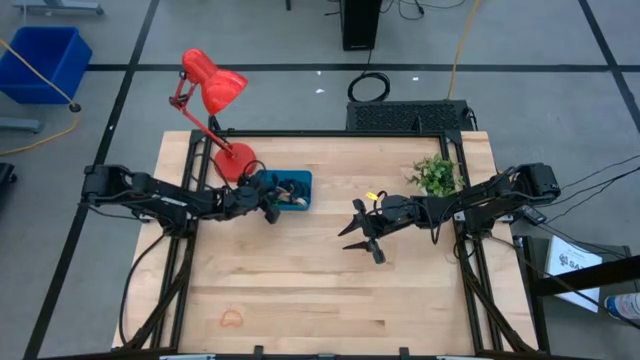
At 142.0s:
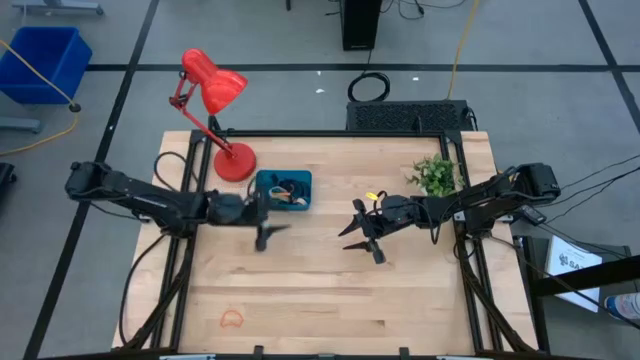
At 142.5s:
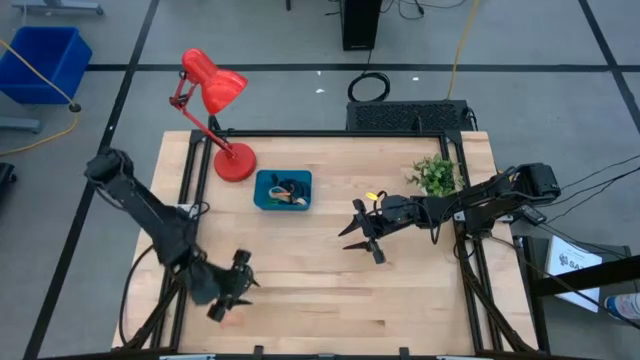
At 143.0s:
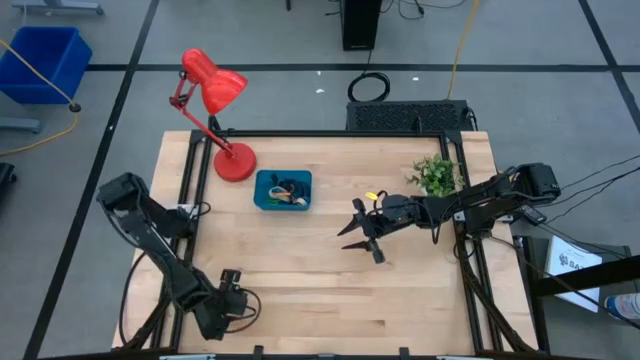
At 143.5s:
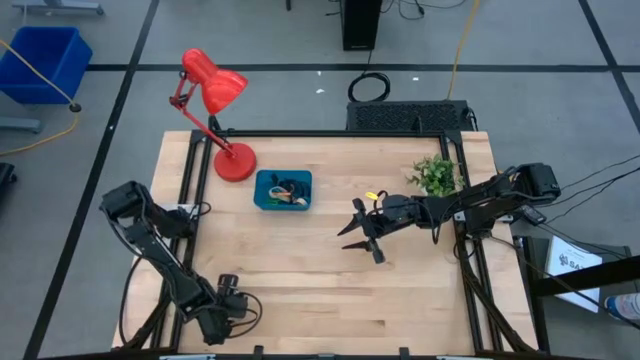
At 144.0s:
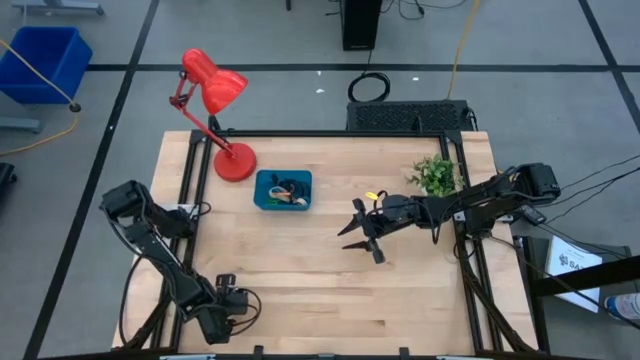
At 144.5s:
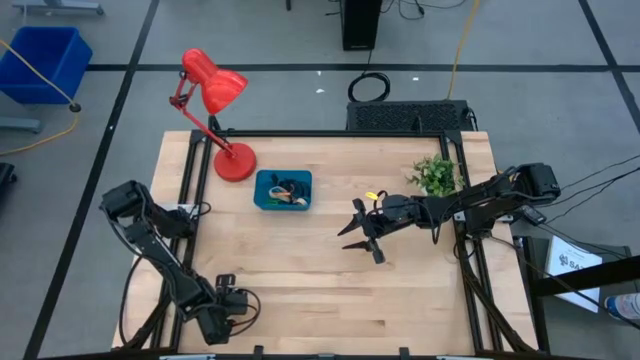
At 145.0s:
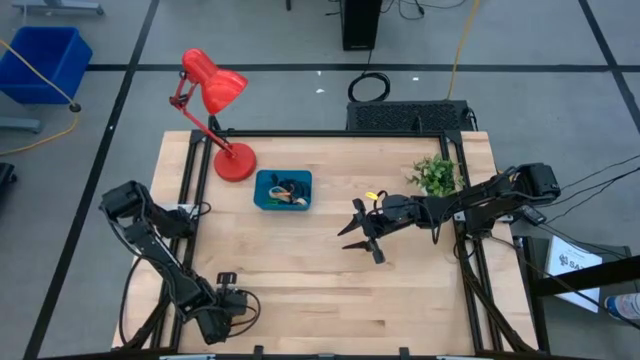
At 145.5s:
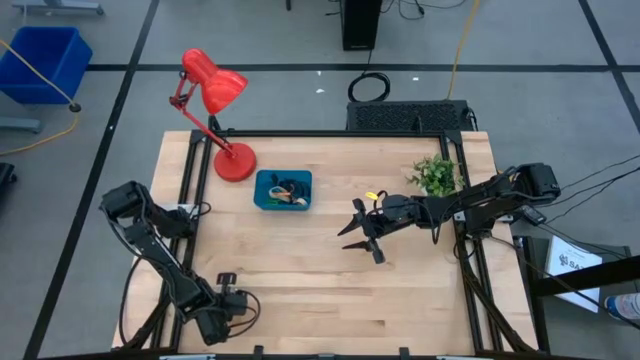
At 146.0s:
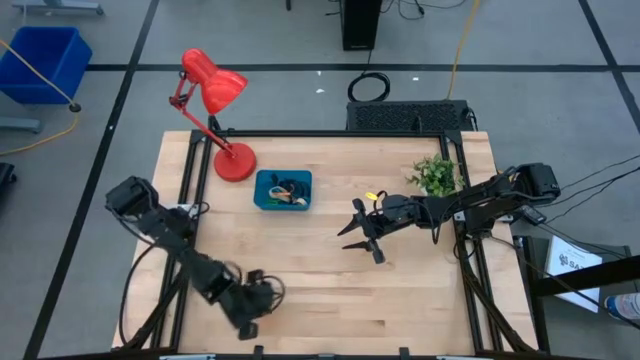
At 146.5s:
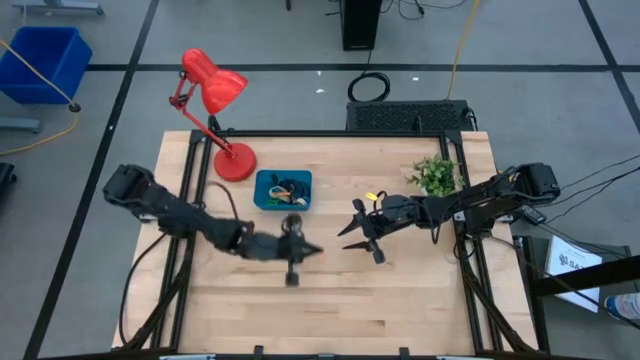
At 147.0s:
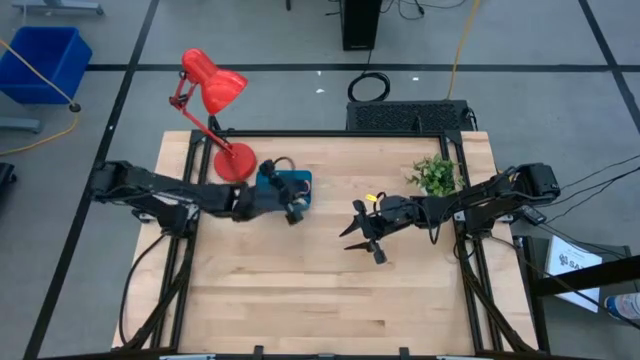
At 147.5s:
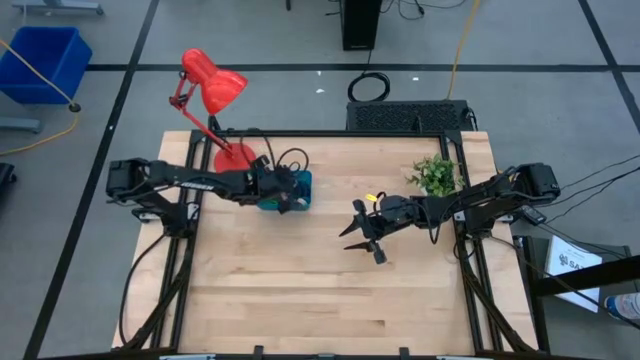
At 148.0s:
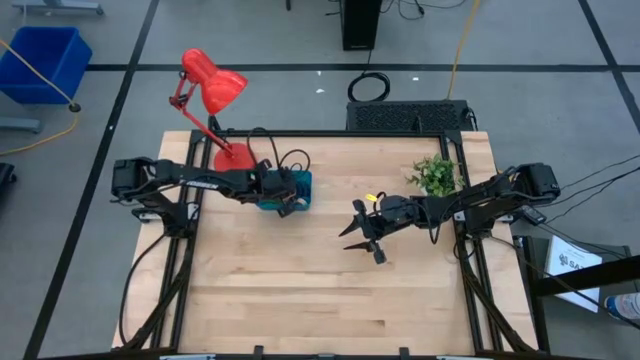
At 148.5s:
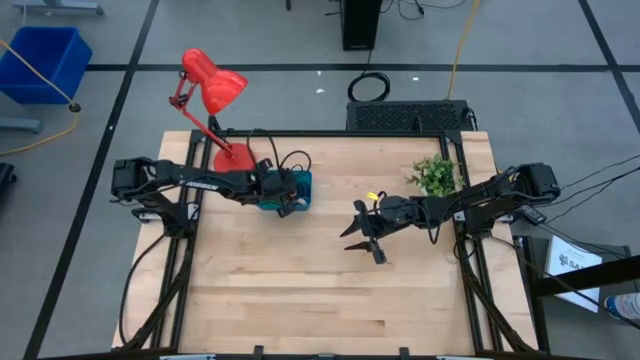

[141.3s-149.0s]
Task: Pick and place rubber bands into bin
Put the orange rubber band into the blue bin

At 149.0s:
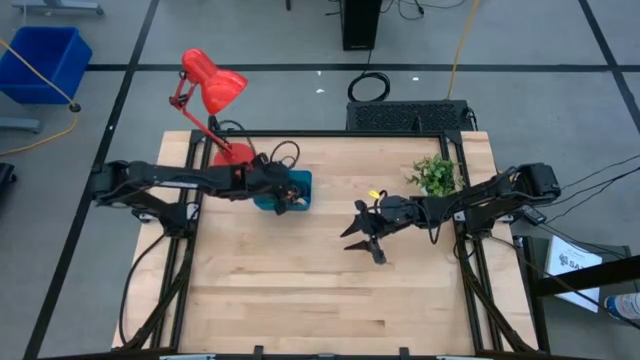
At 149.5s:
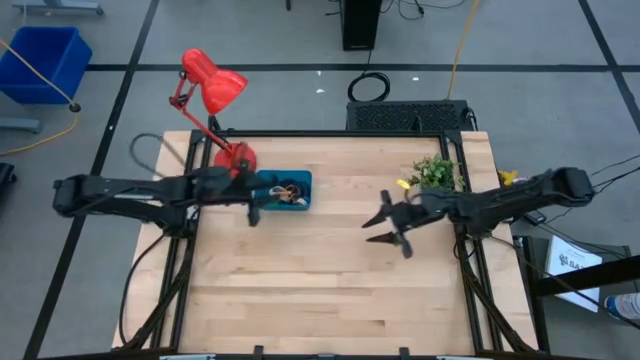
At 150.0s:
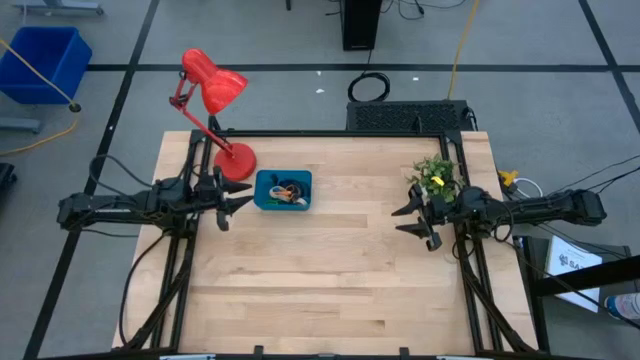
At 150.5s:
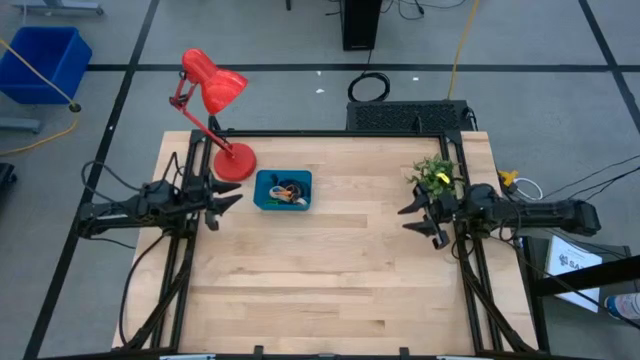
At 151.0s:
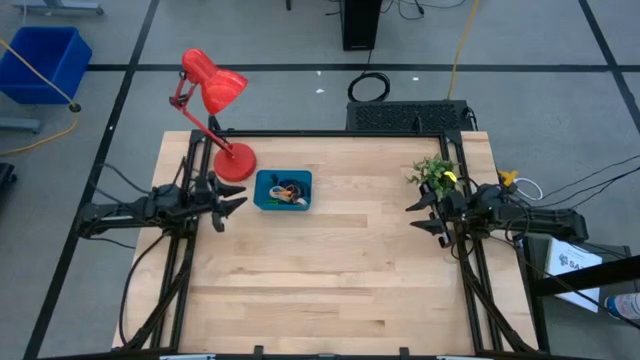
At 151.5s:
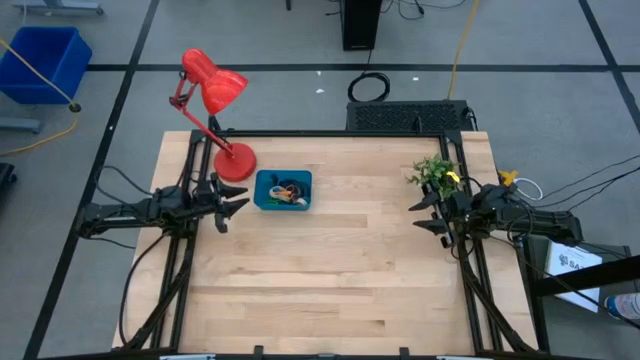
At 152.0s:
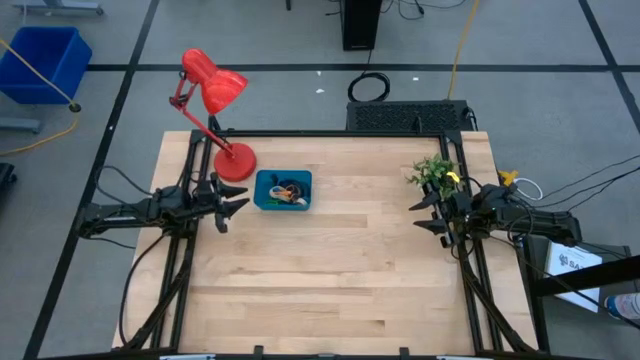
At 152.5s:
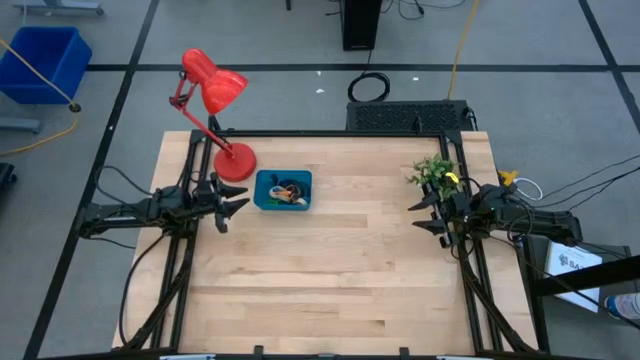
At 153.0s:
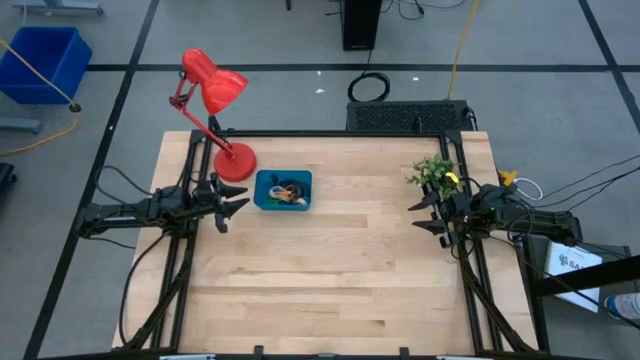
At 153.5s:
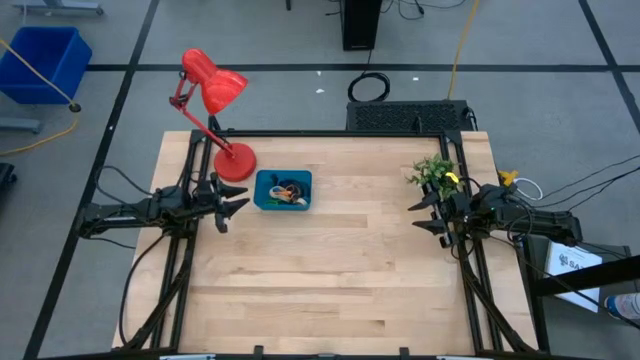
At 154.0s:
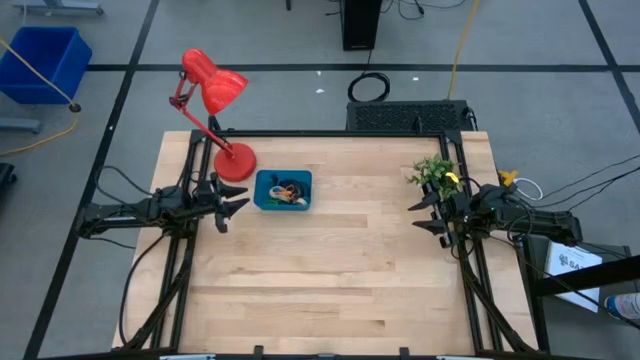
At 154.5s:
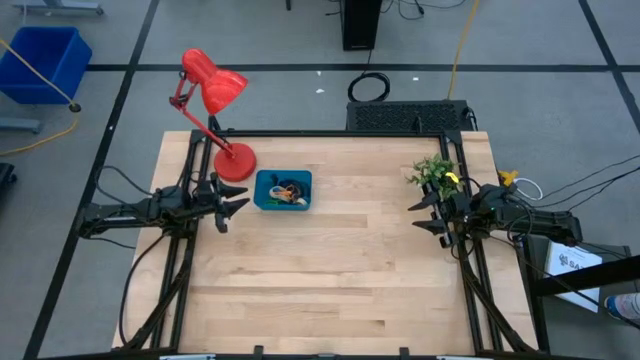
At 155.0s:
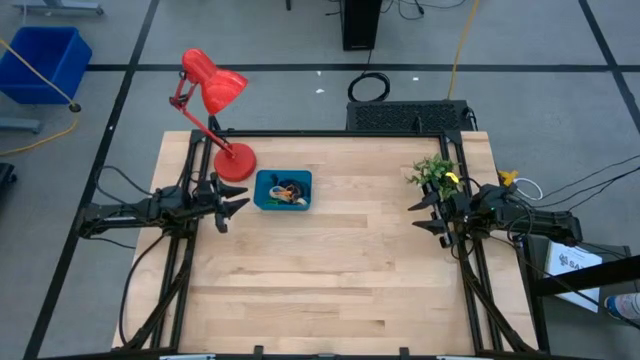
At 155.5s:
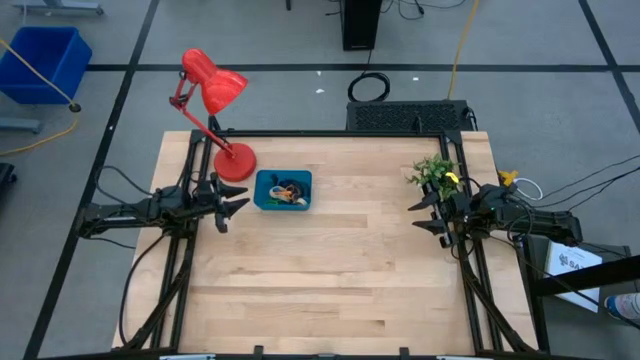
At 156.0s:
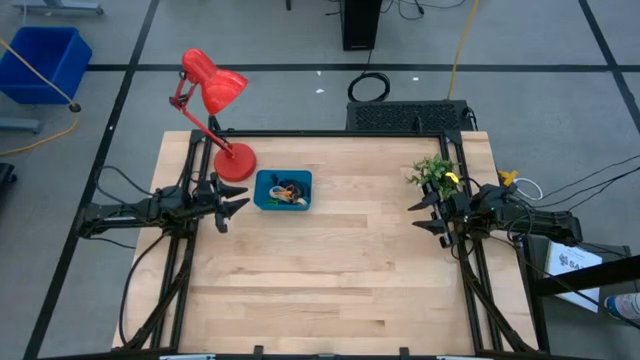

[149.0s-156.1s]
Return to Home Position

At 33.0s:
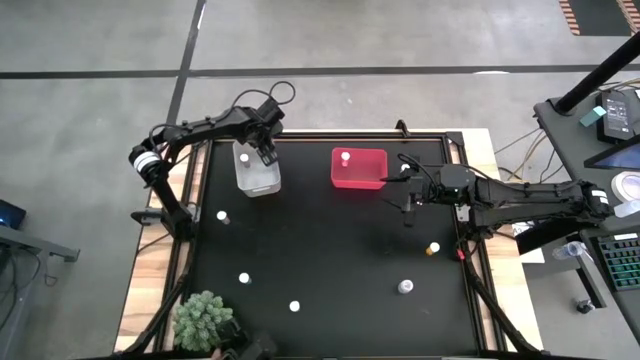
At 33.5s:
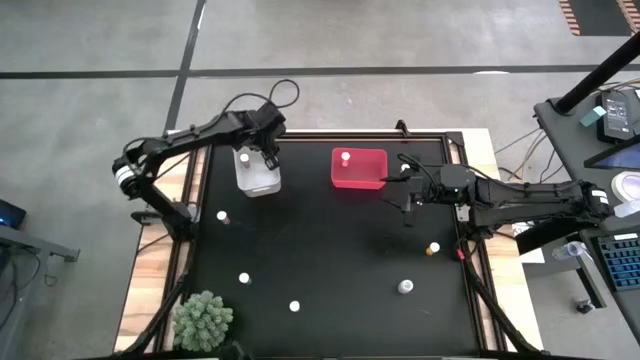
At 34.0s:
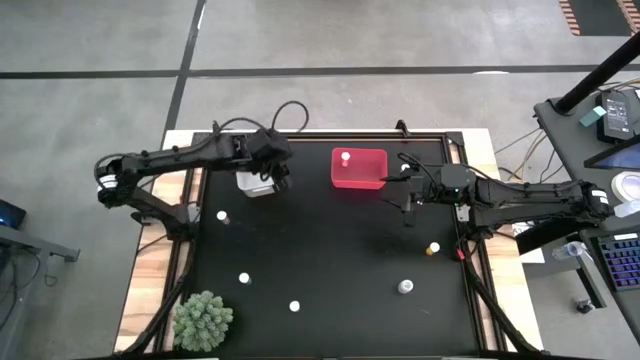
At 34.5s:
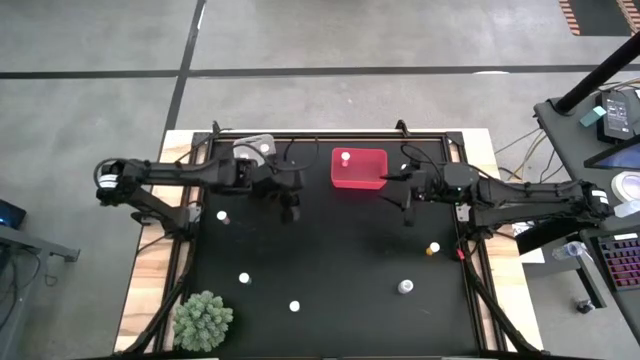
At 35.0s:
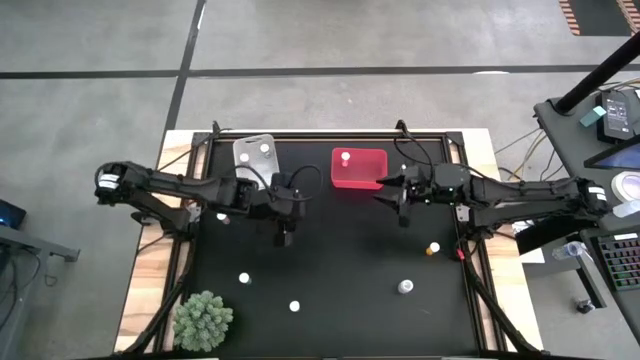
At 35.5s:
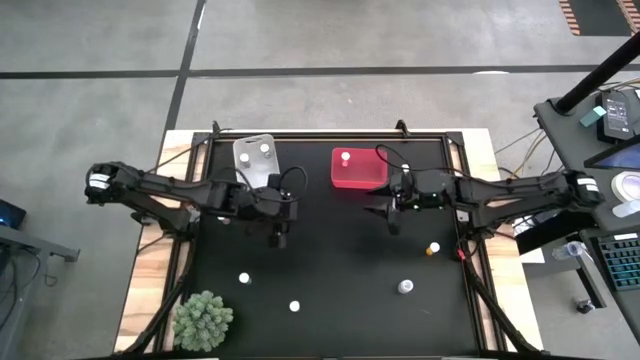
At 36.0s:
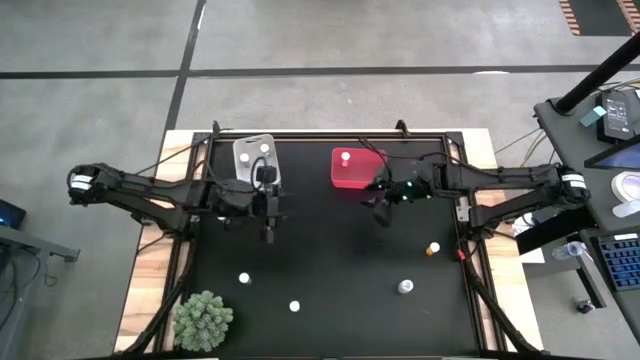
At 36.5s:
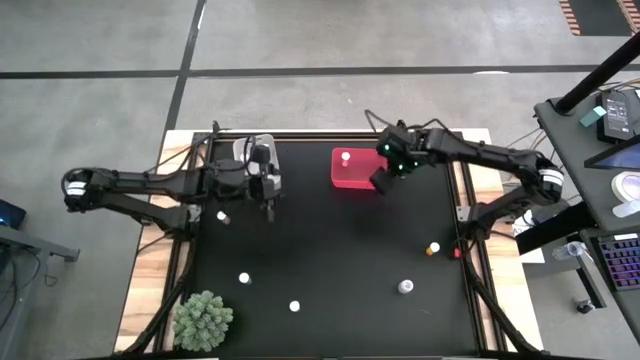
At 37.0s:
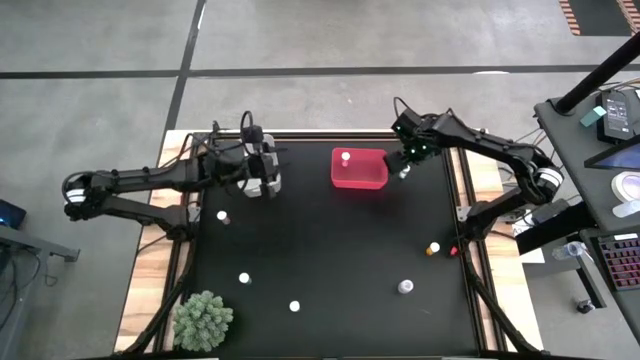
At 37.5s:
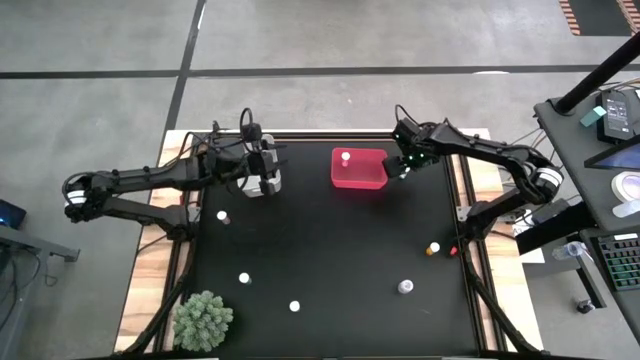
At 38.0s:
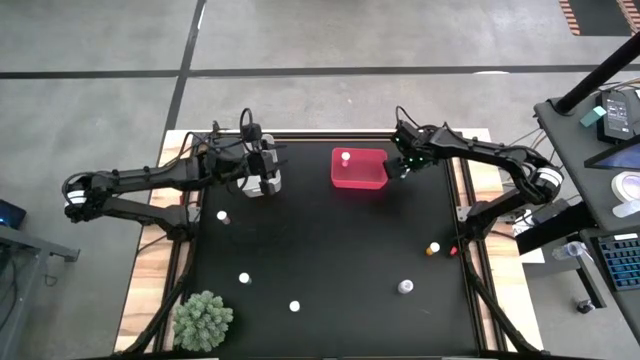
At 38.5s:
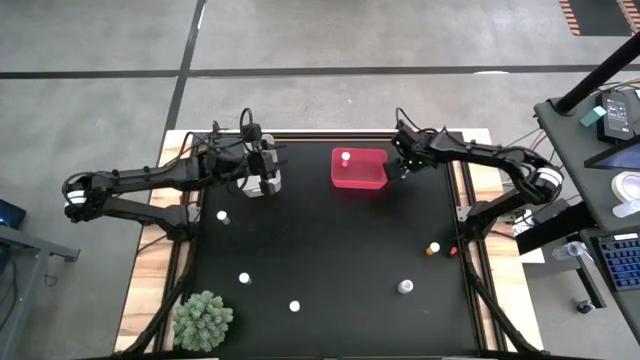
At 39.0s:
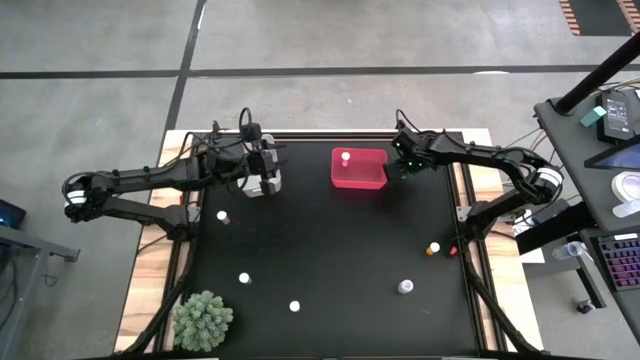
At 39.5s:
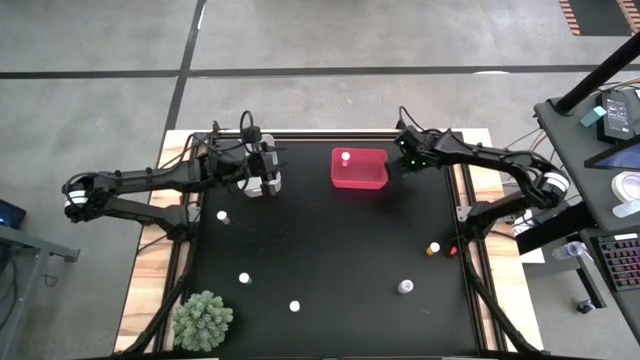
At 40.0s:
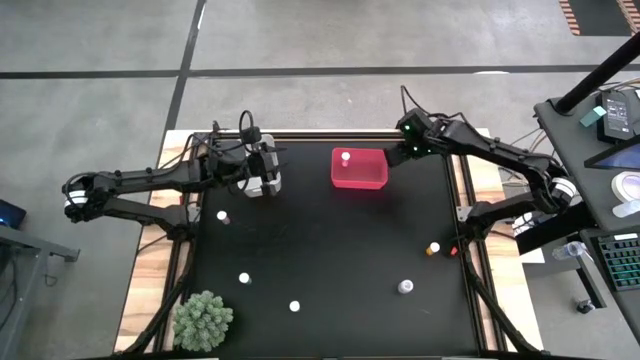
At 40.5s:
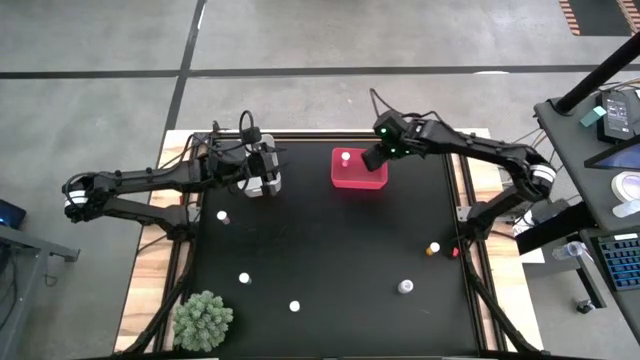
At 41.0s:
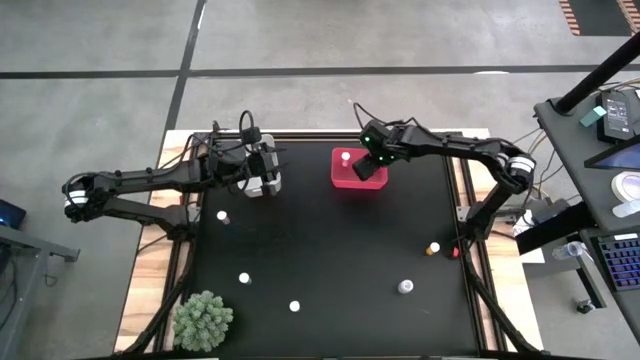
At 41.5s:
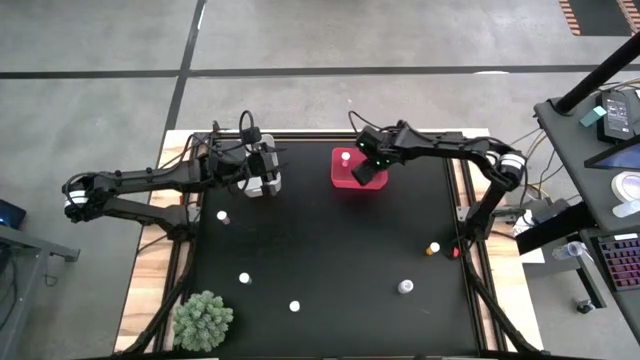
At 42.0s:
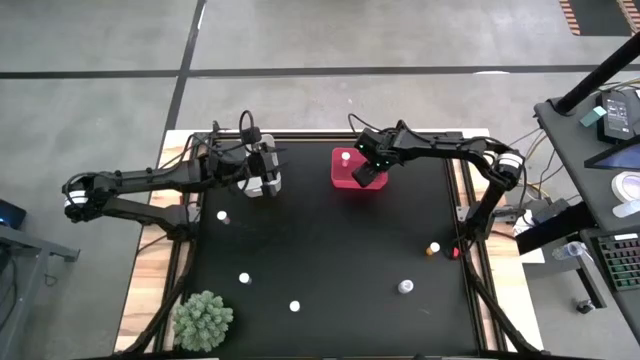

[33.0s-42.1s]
Task: Pick and place medicine bottles into bin by pill shape (circle, oval)
Put the blue tablet bottle into the red bin
